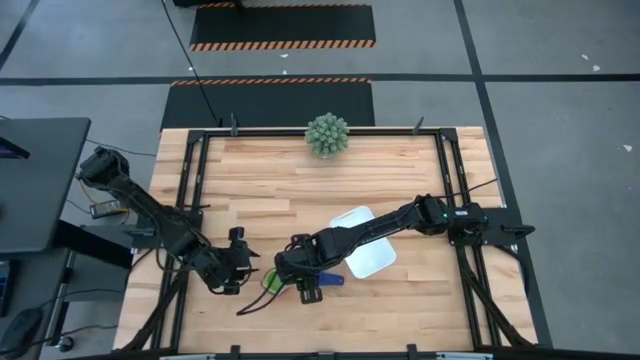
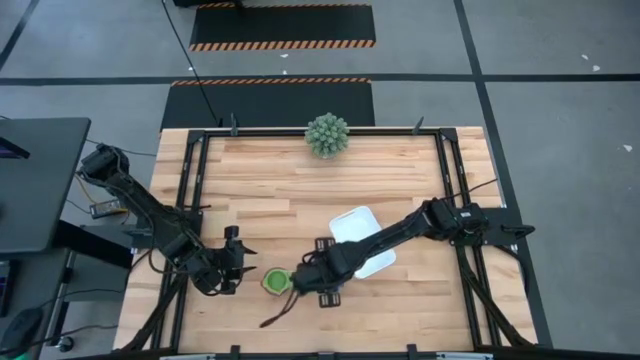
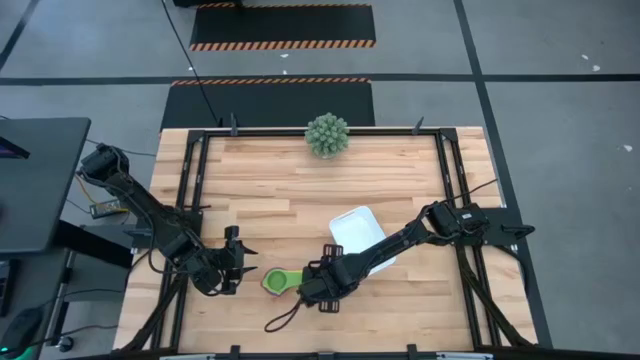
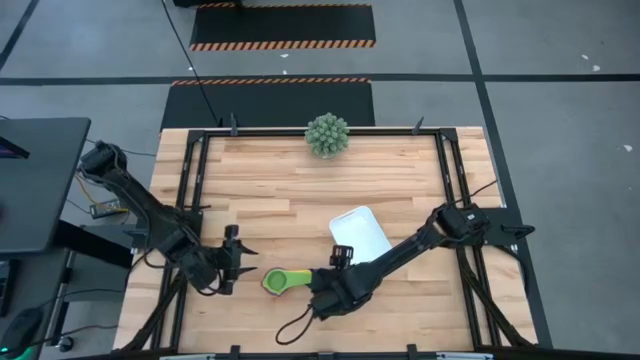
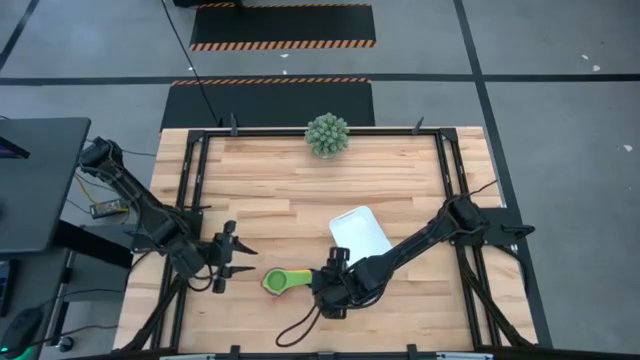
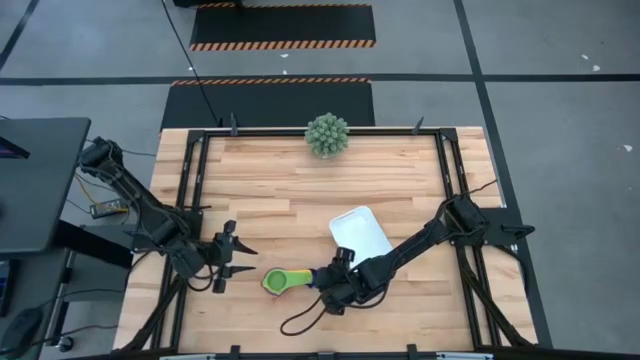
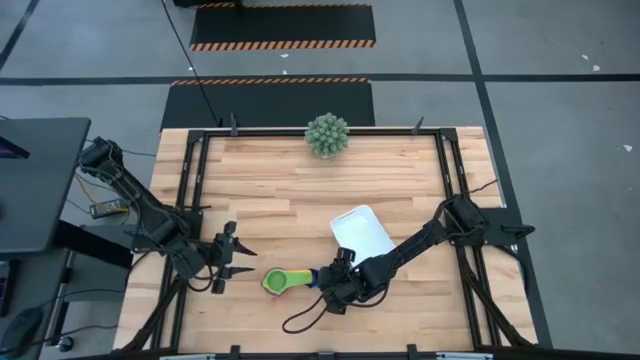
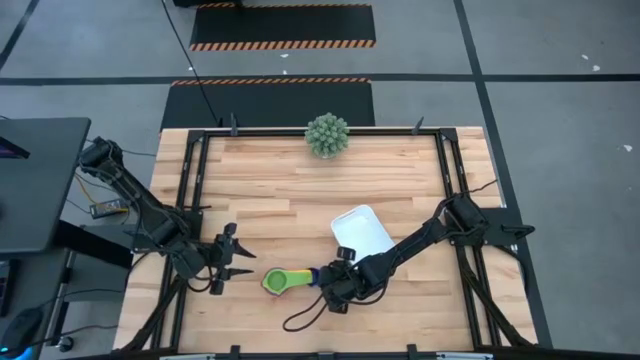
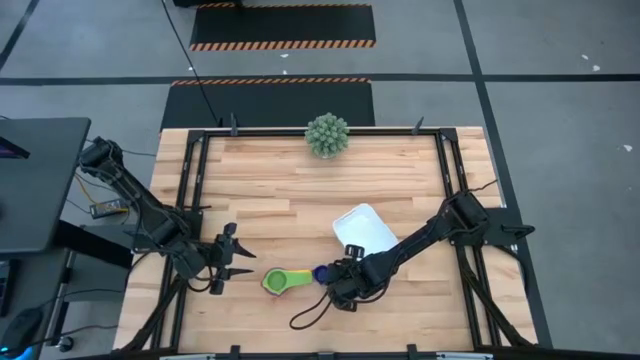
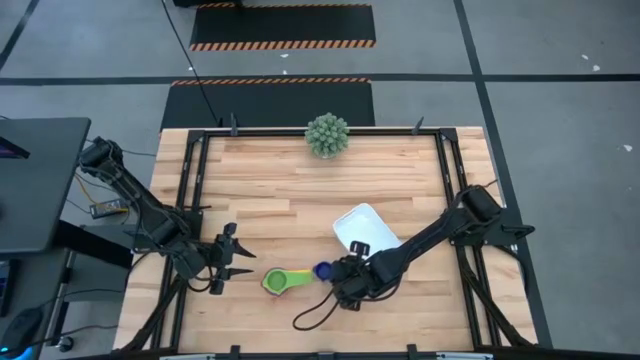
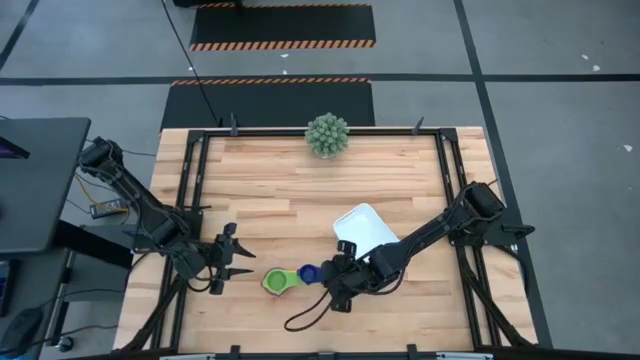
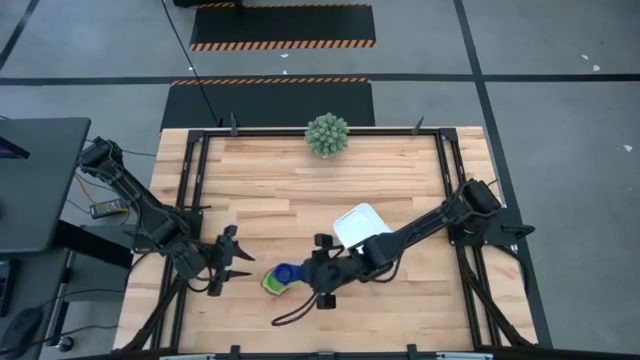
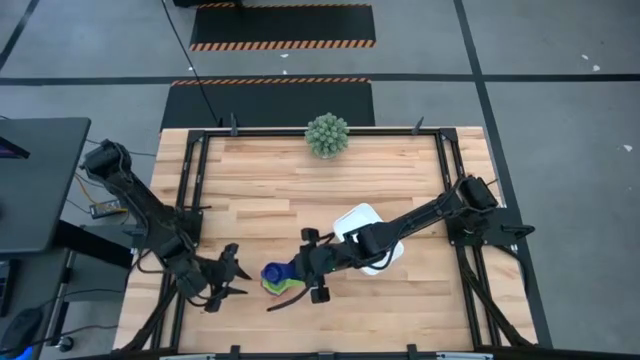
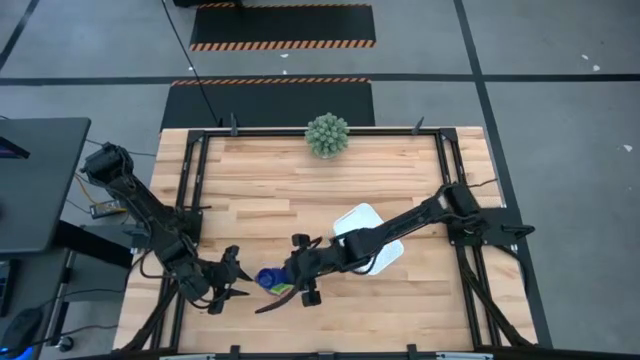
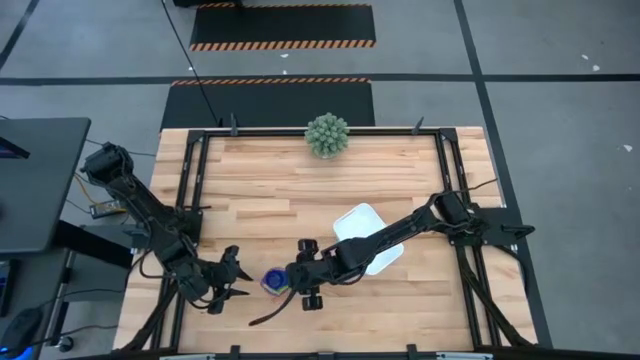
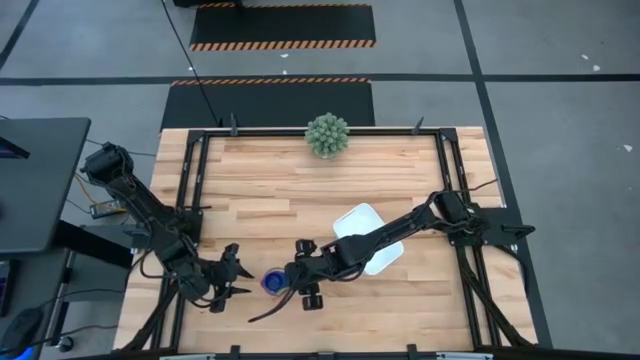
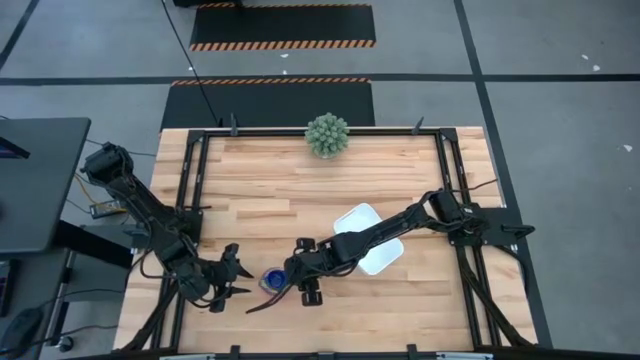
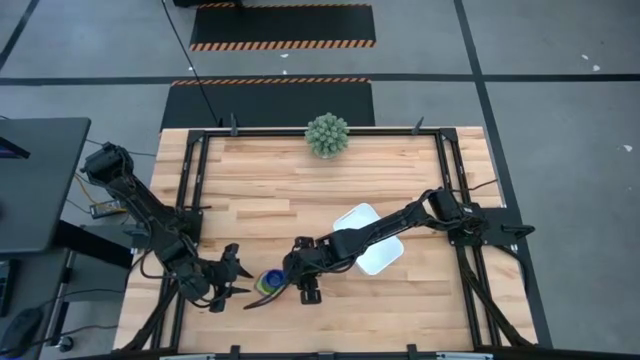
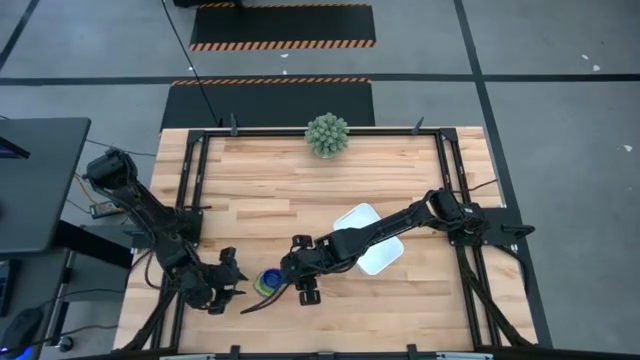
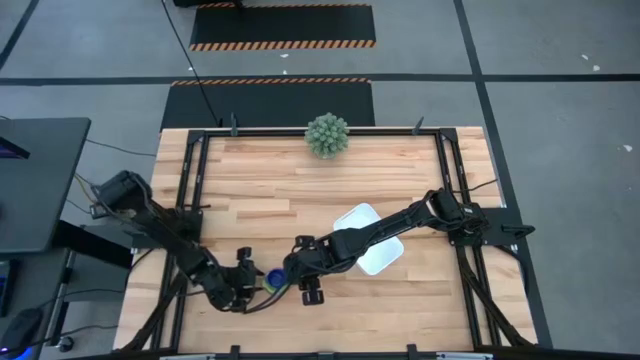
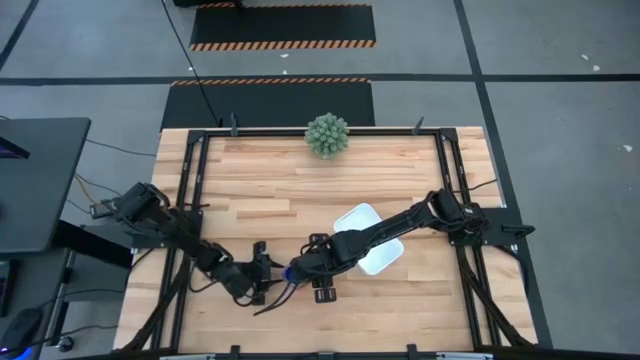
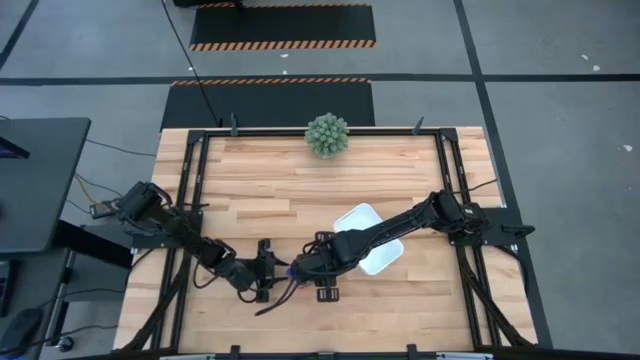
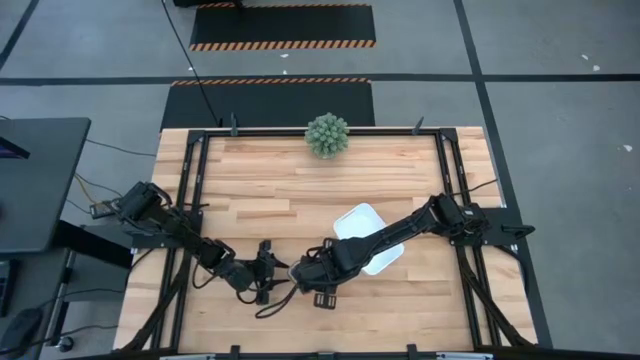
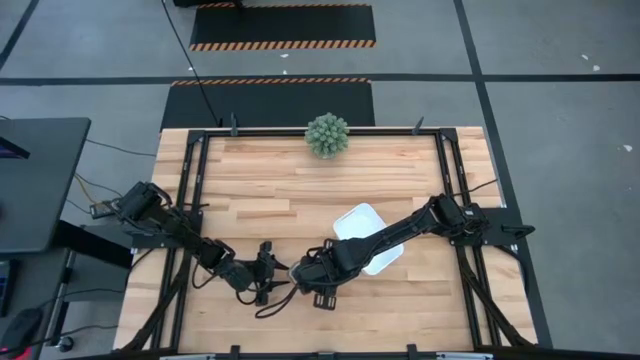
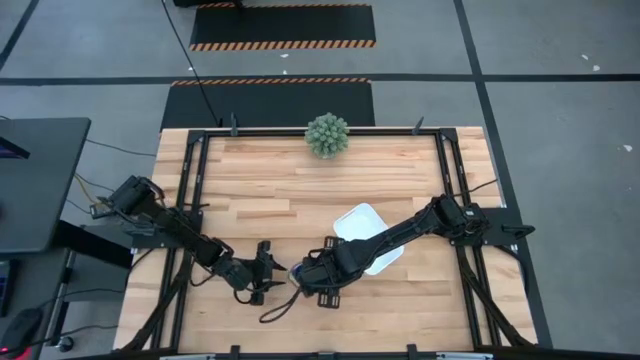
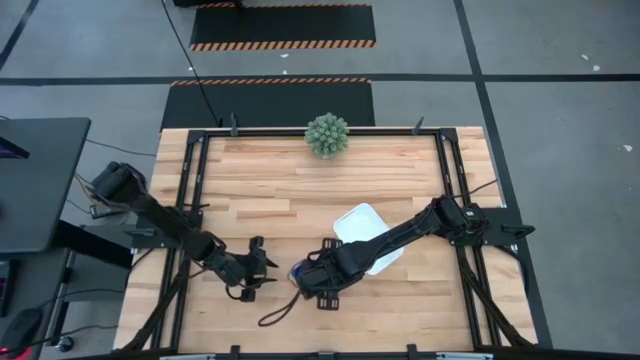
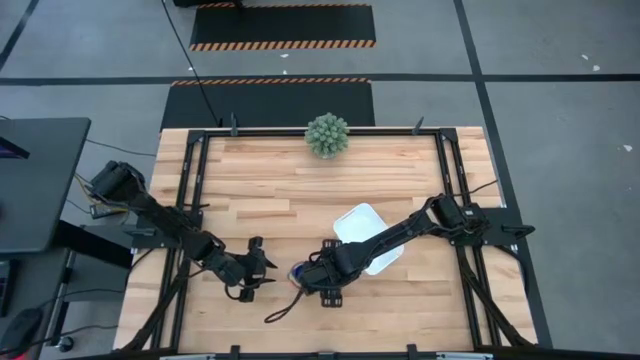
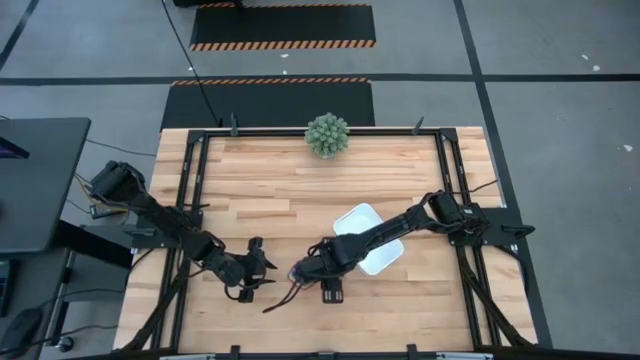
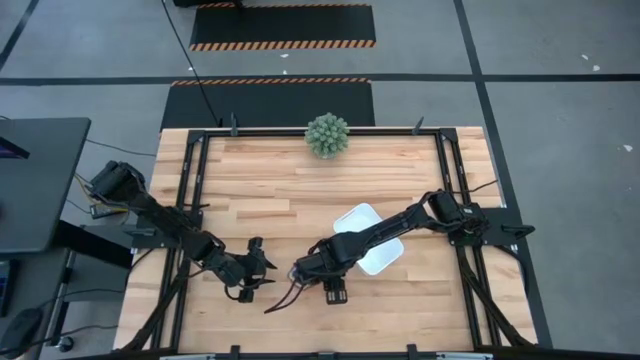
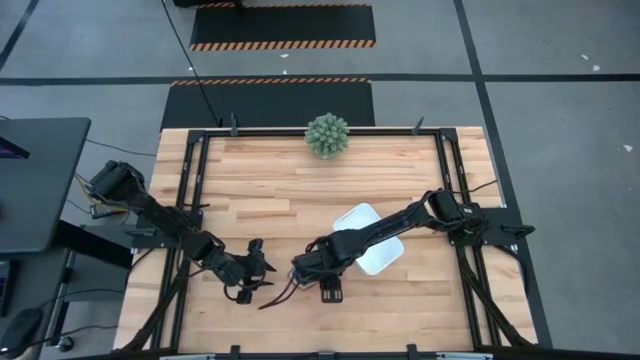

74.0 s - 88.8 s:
Task: Nest measuring cups in basket
Stack the dark blue measuring cup on top of the green measuring cup

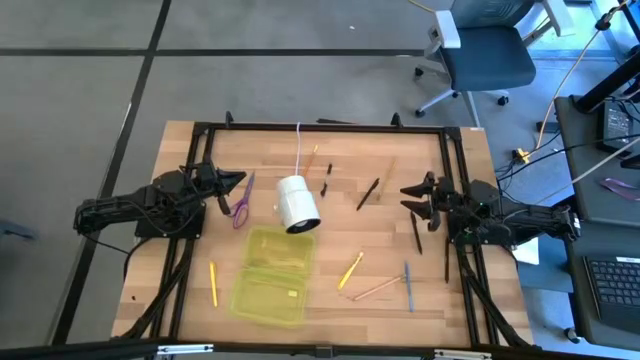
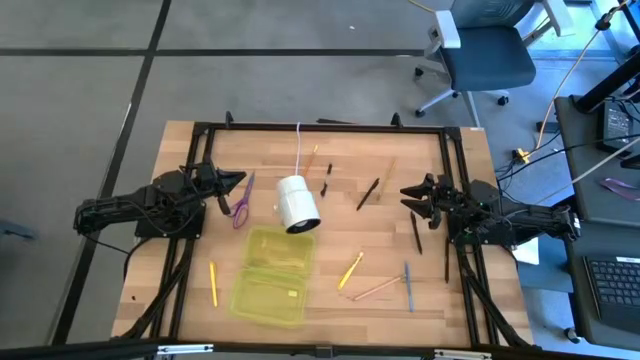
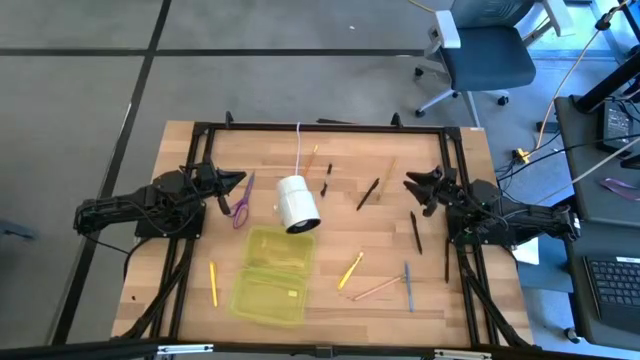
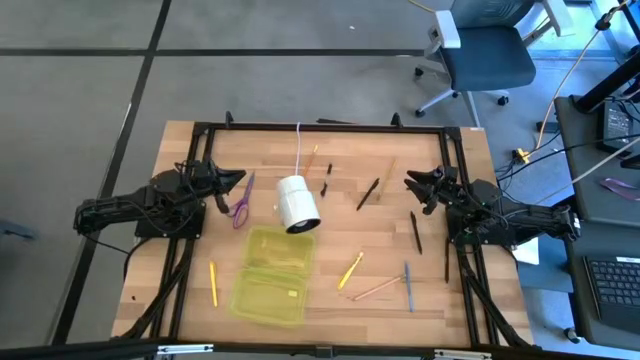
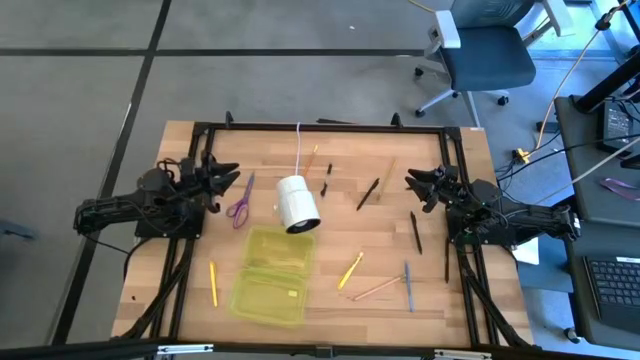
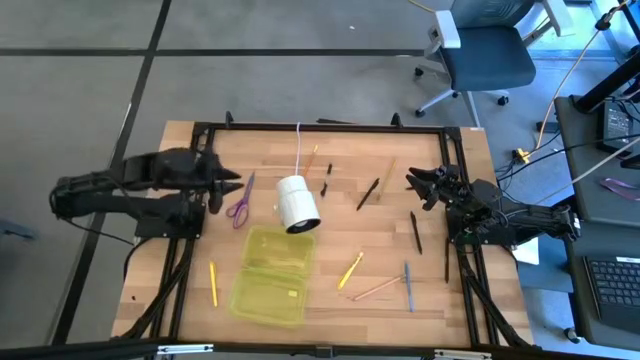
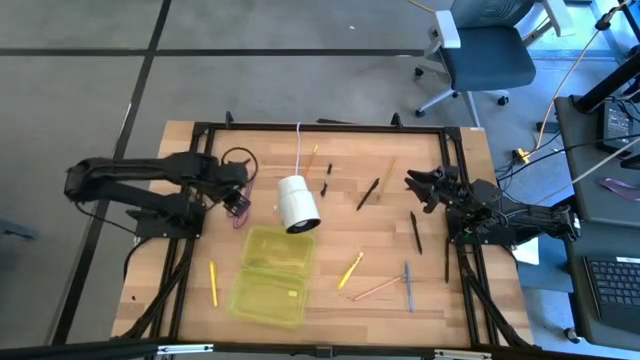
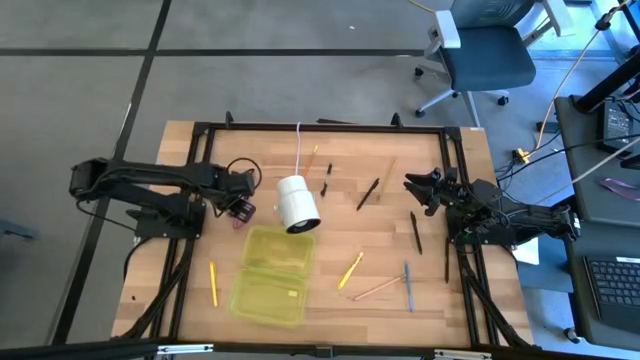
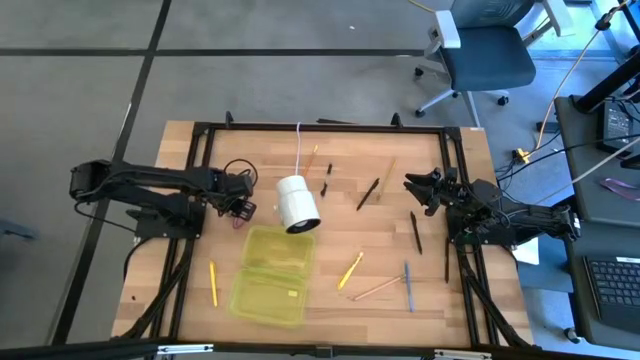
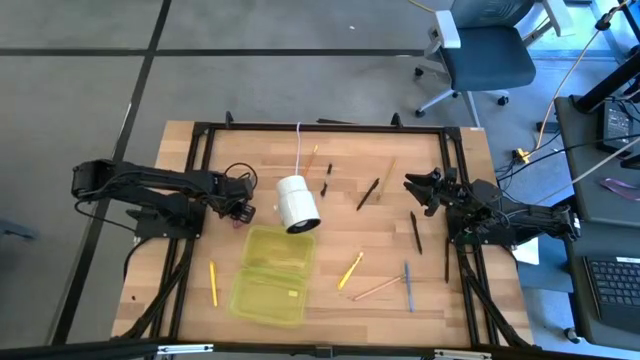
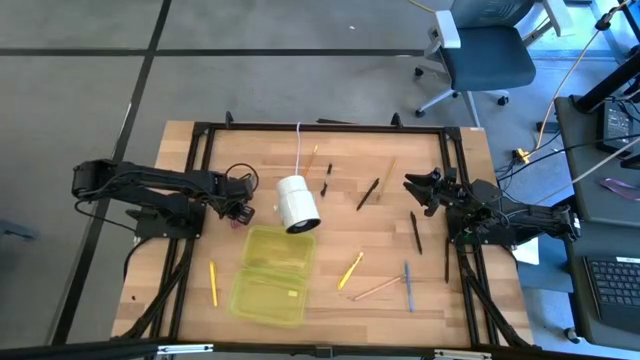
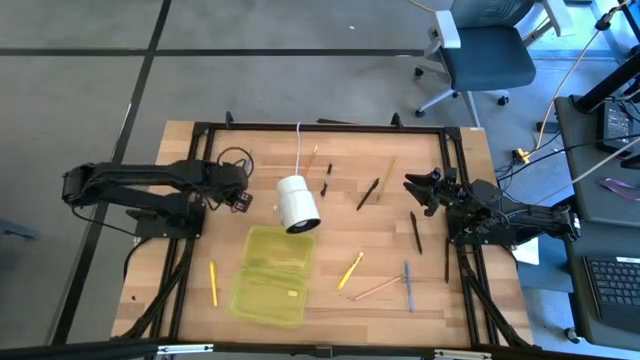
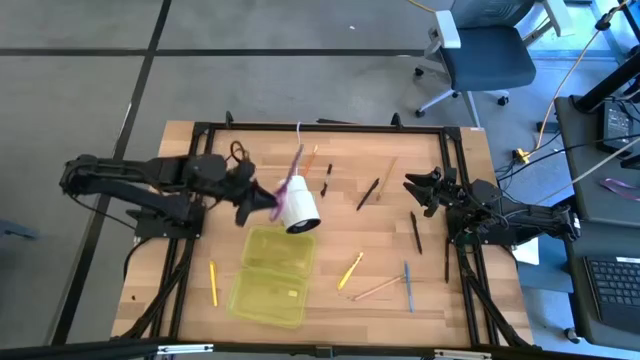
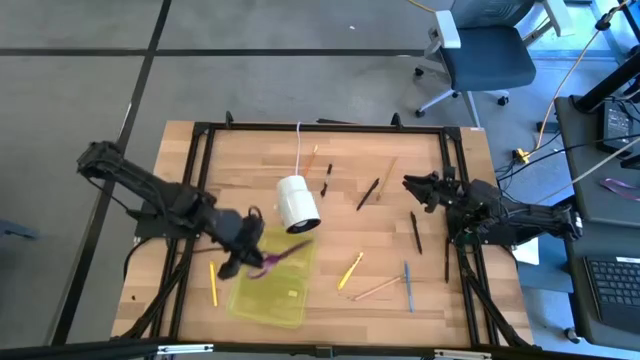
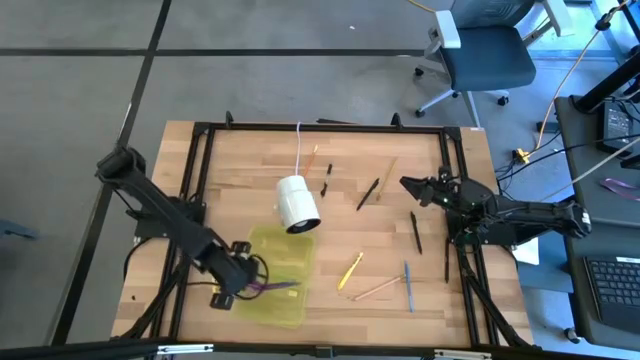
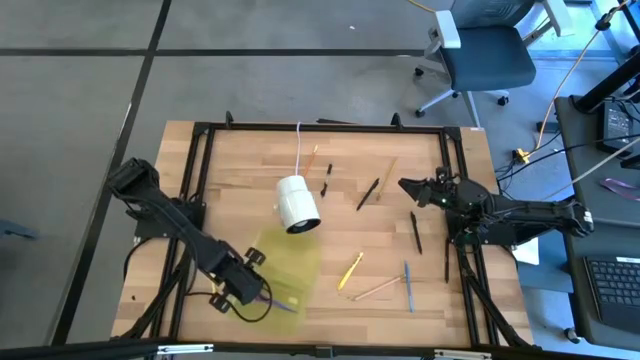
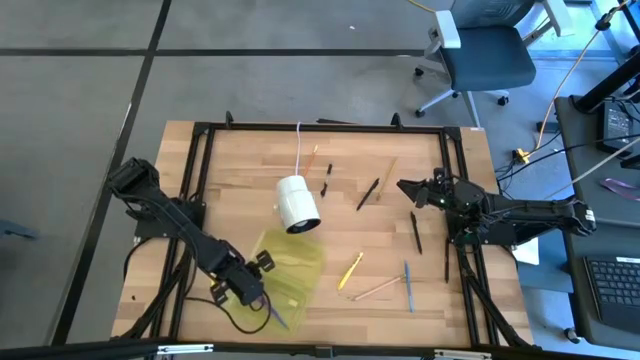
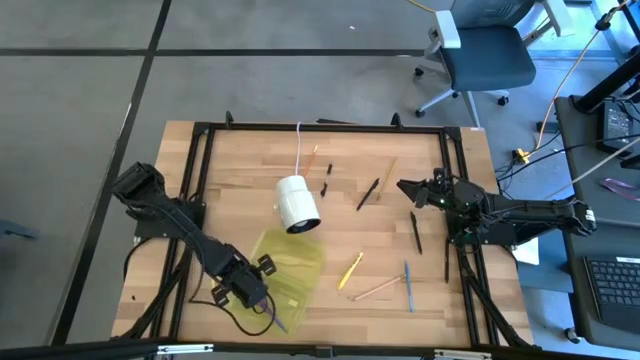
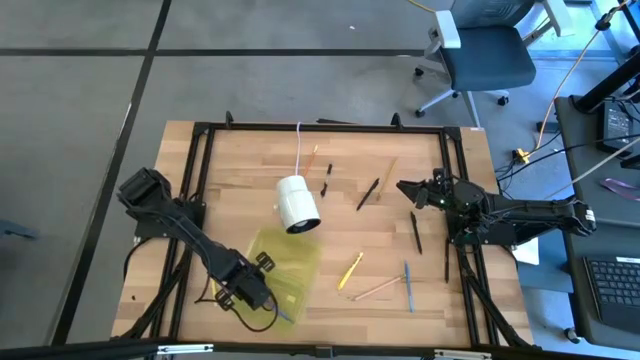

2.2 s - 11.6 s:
Task: Pick & place school supplies into a supply box
Put the scissor into the supply box
